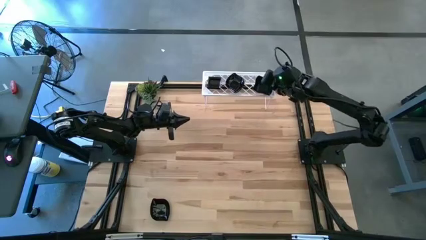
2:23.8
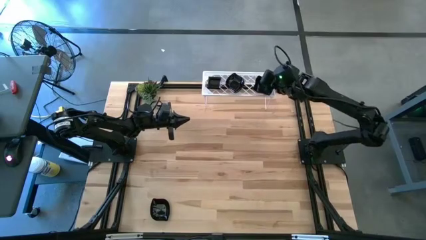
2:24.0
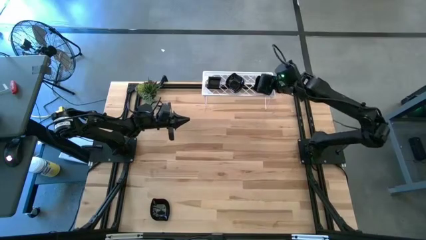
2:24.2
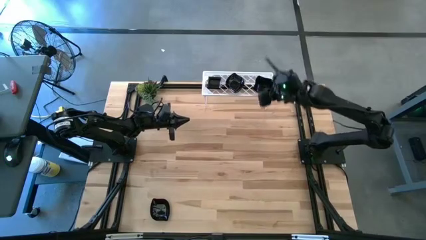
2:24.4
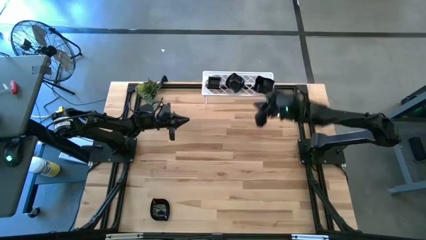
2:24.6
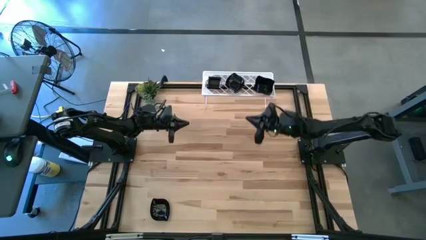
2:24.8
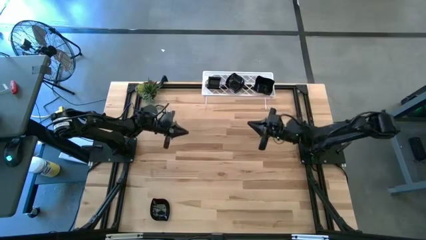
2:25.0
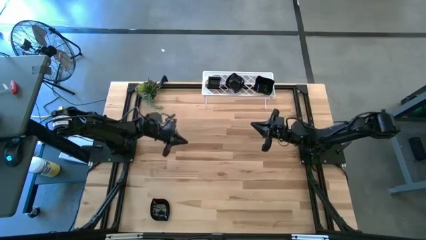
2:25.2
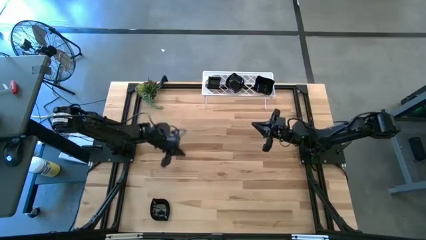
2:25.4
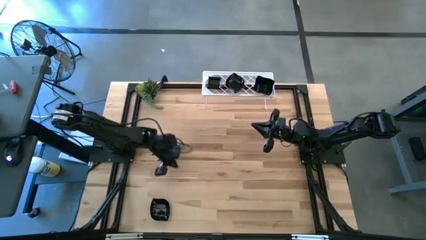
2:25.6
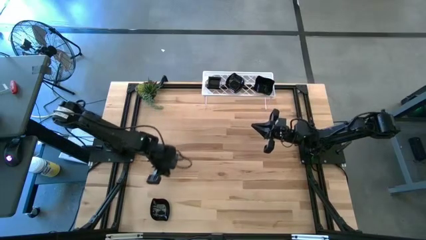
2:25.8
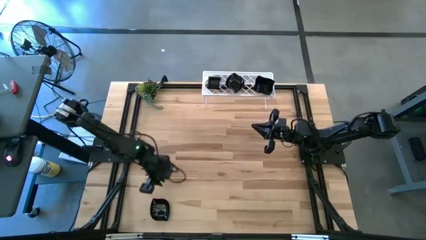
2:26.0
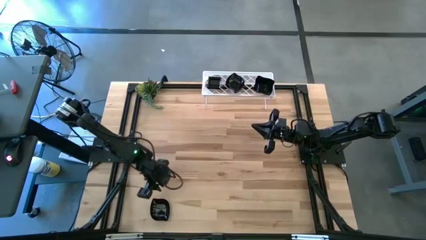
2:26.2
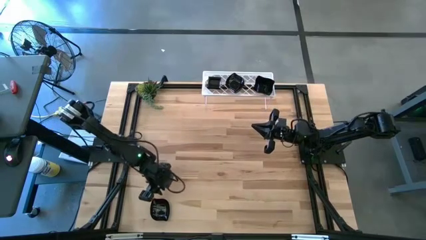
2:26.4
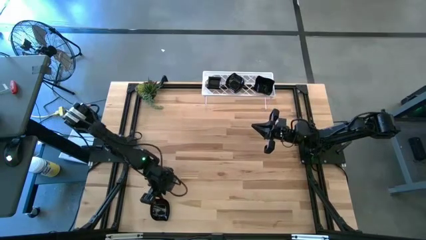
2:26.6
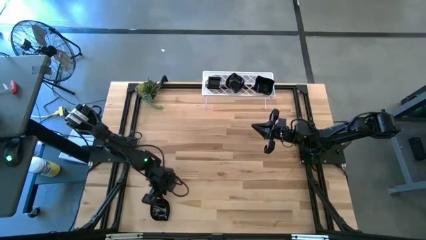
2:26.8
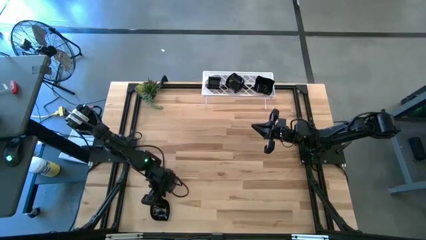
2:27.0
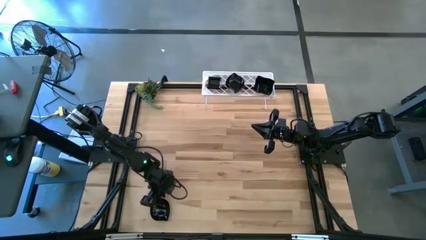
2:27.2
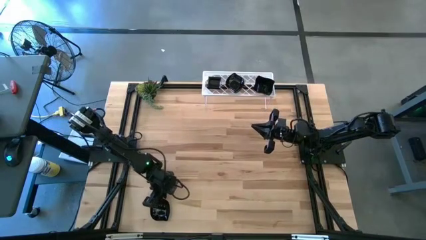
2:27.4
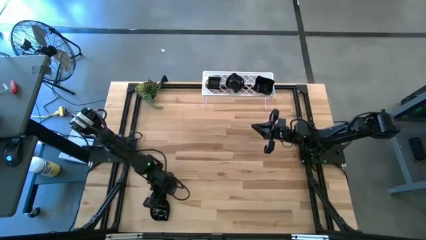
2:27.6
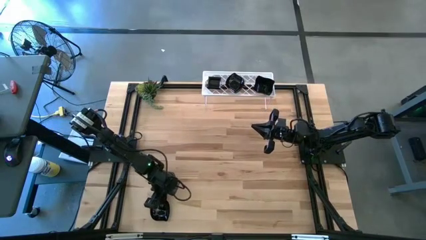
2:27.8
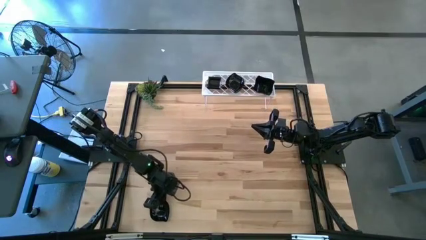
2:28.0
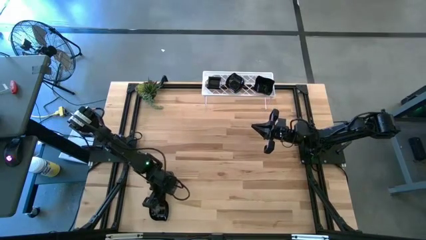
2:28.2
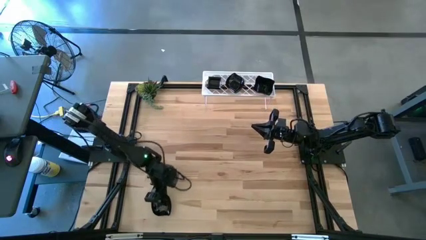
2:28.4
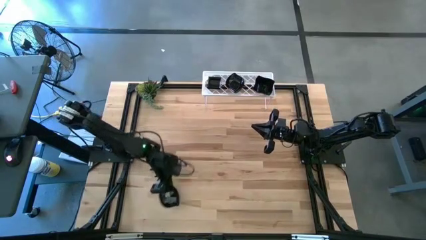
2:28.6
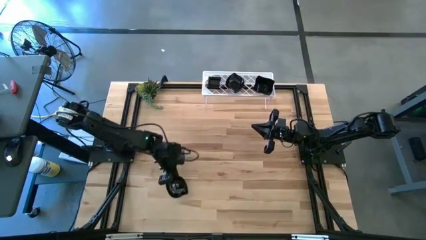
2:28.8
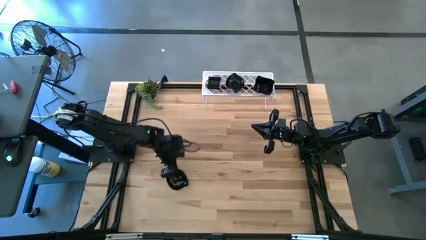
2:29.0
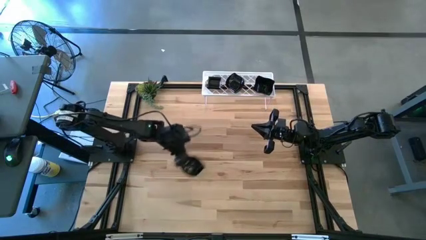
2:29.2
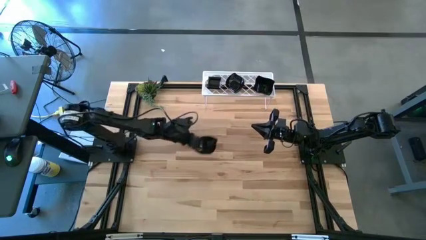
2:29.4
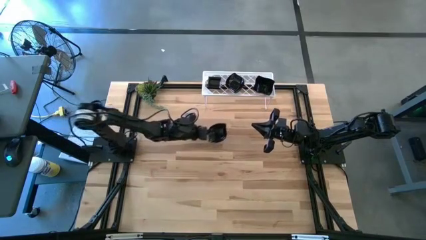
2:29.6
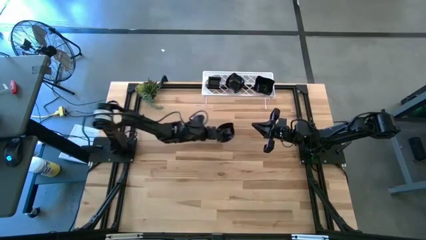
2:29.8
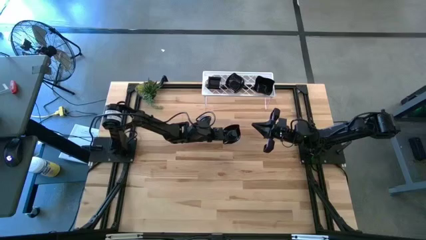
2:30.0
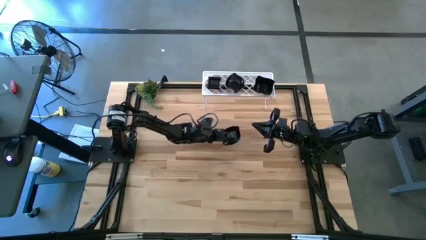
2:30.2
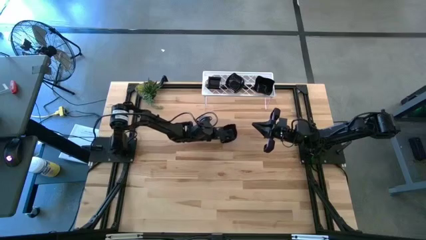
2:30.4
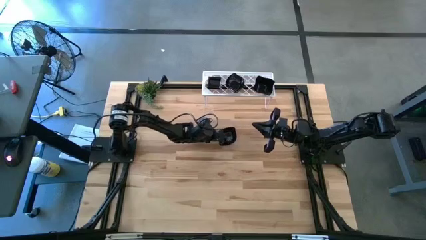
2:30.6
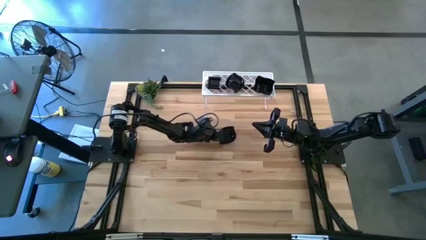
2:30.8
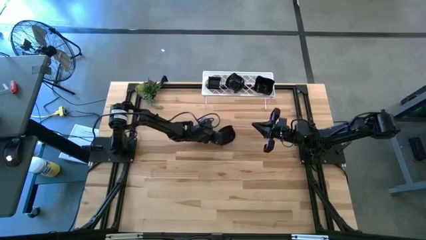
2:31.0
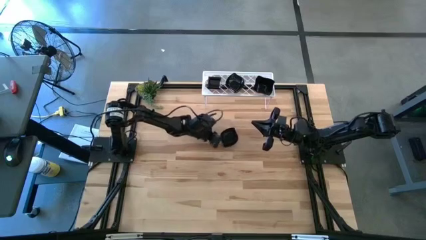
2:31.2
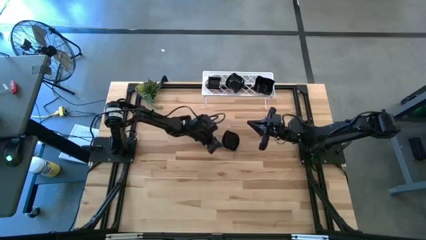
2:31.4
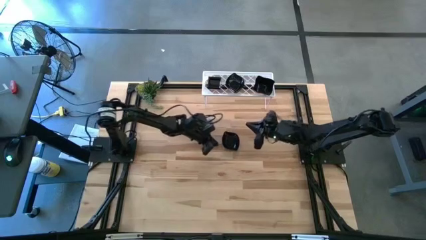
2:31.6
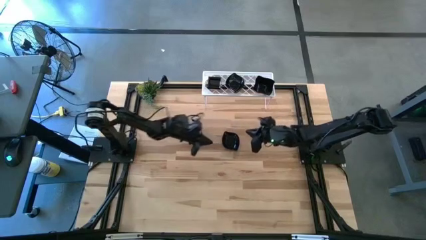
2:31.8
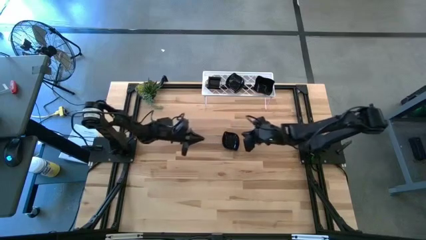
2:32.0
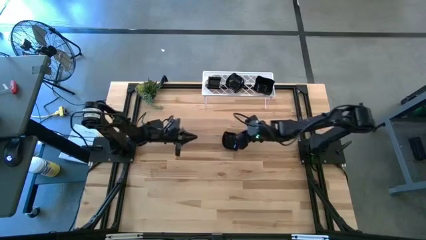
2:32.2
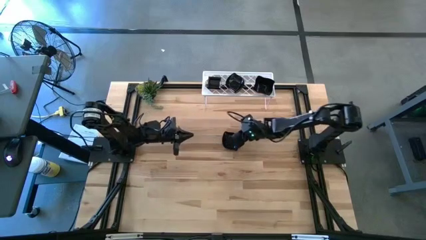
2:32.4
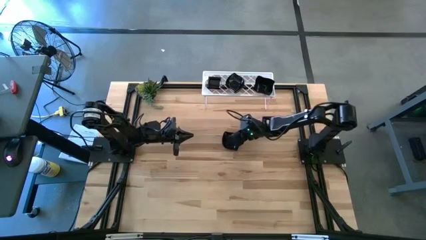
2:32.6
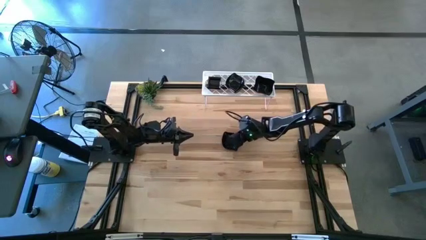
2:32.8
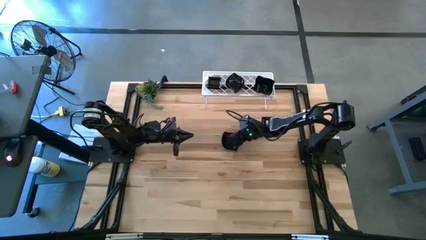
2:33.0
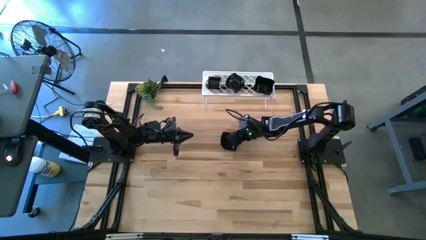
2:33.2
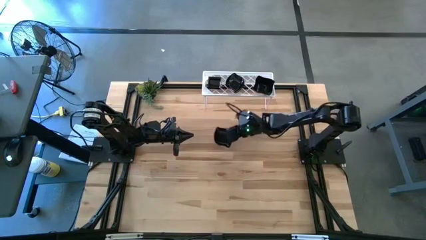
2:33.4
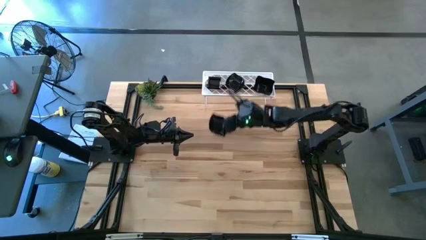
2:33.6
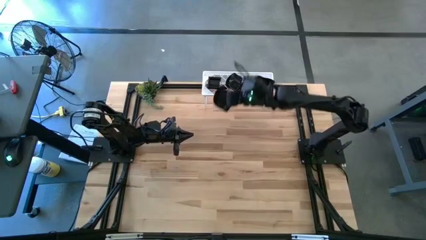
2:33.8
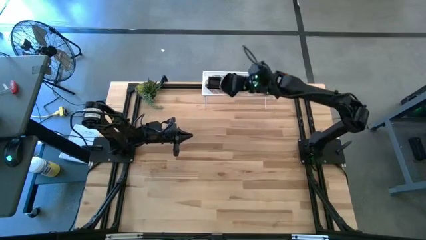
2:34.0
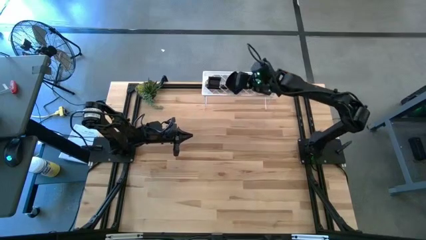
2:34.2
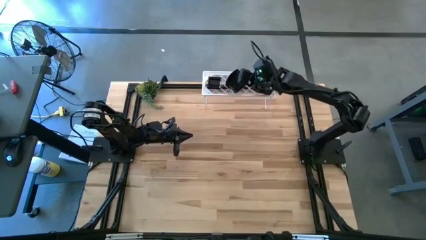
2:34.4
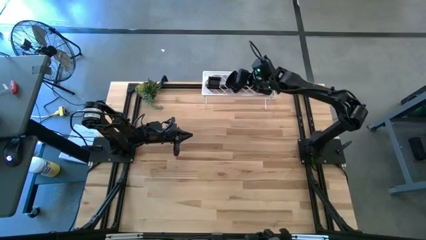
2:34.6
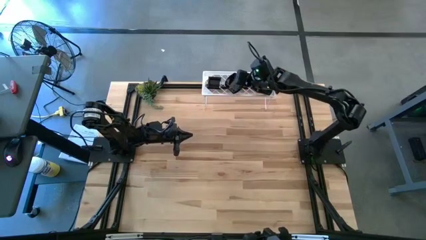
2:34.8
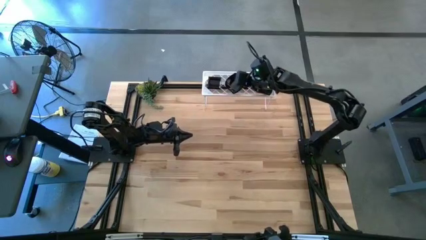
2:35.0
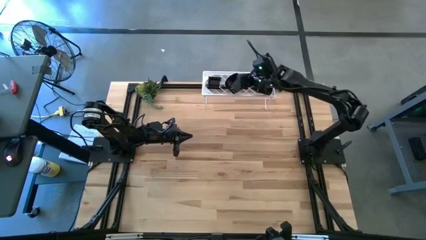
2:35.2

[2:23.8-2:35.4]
Task: Pick & Place Mini shaped plates
Stack the leaf shaped plate on top of the stacked leaf shaped plates on the shelf

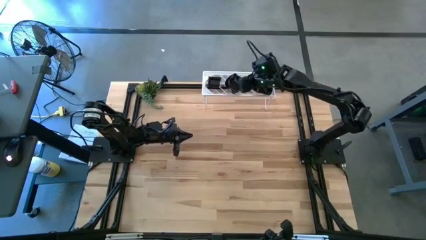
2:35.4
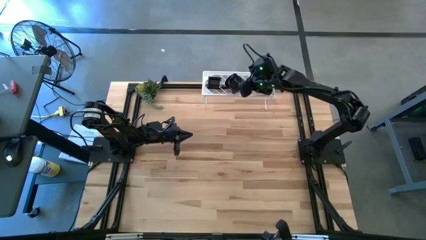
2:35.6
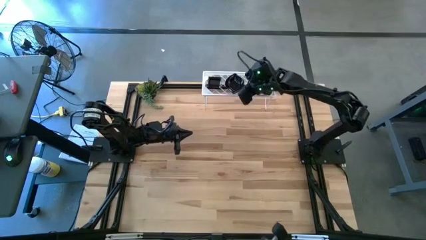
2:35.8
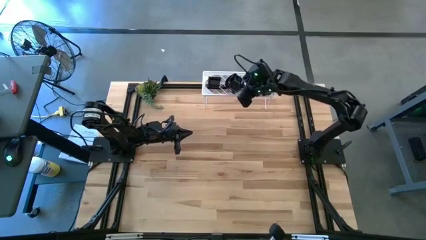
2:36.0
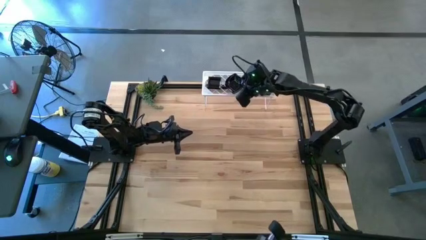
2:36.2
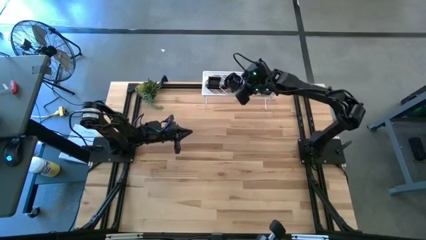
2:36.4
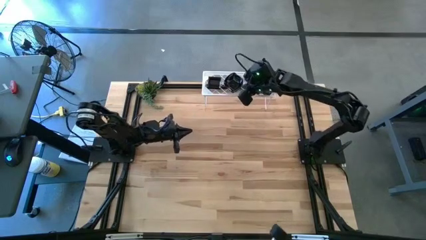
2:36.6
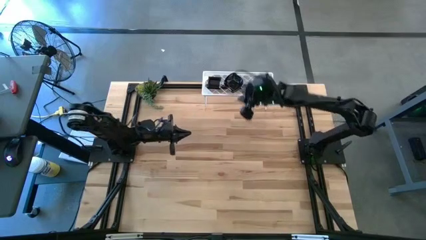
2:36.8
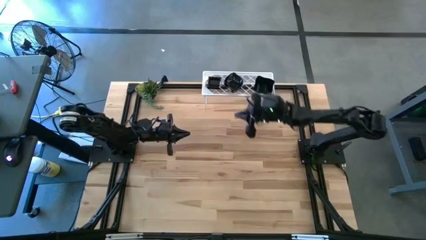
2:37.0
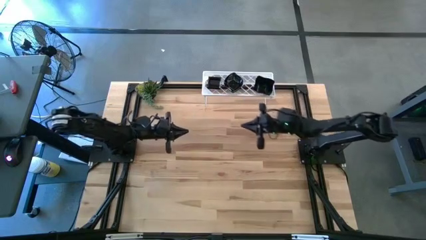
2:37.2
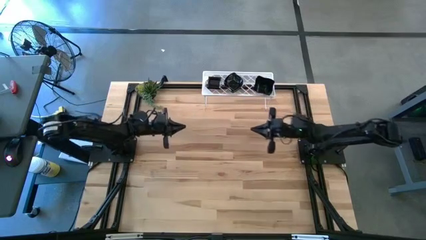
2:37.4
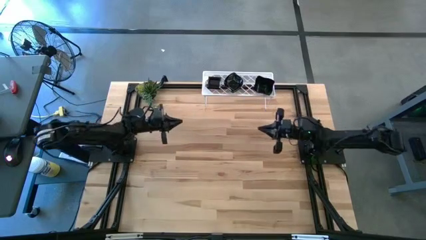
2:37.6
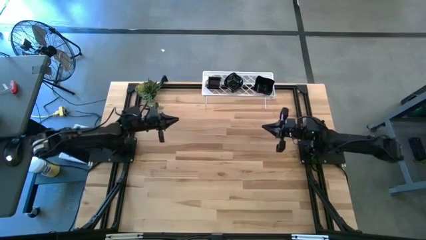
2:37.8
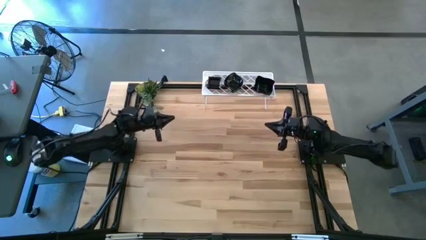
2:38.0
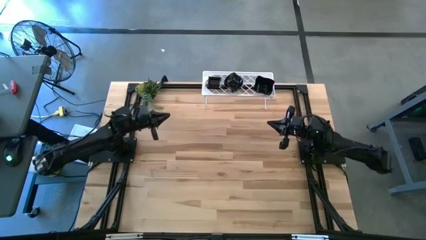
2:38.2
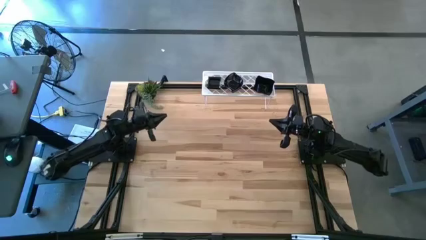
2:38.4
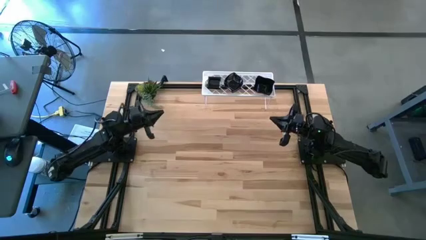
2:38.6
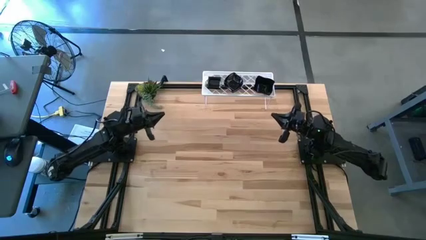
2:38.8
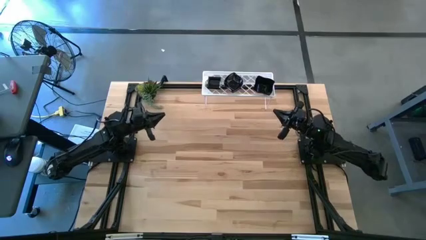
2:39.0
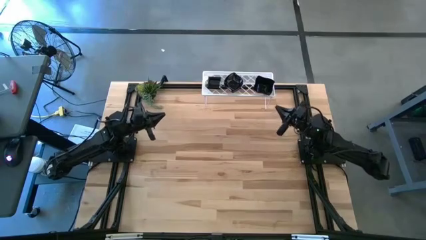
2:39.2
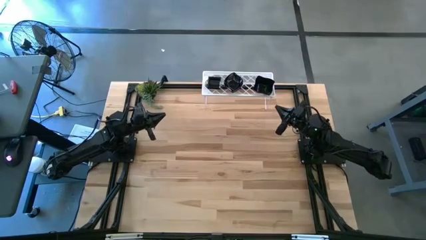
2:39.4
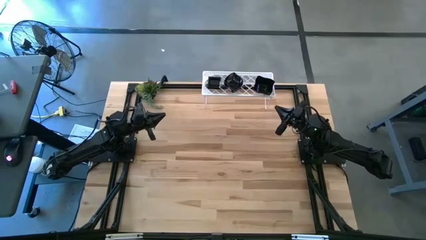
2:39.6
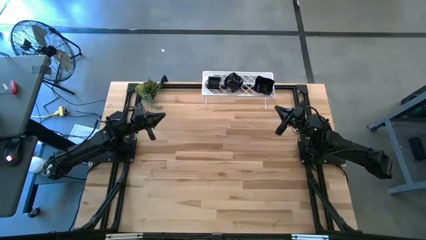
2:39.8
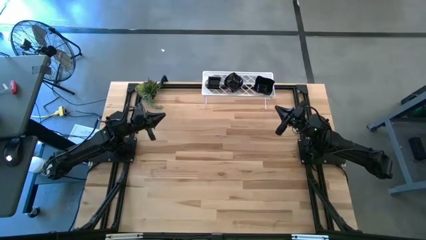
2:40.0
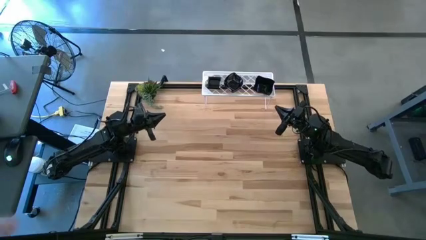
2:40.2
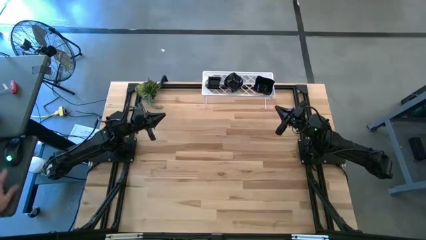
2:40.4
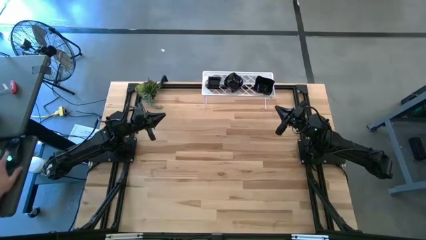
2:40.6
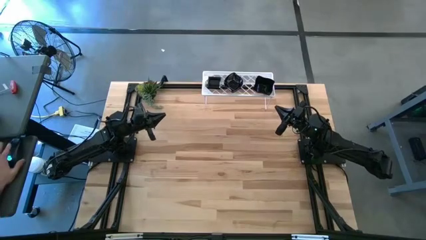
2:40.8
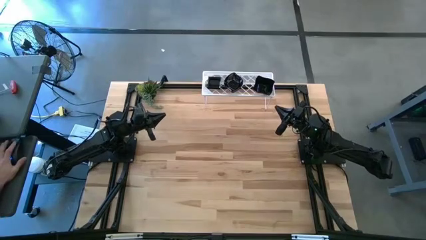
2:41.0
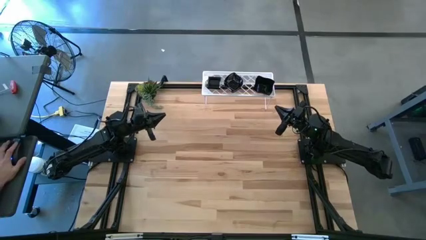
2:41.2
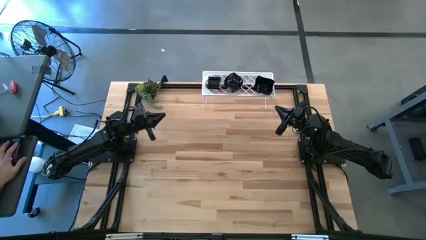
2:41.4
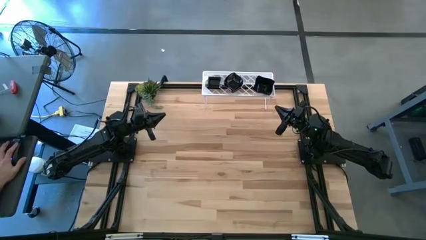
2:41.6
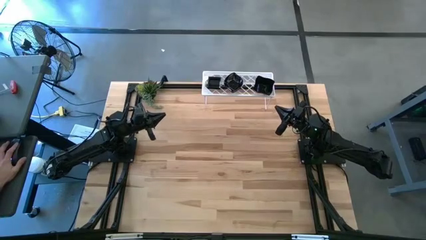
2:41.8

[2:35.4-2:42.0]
Return to Home Position
